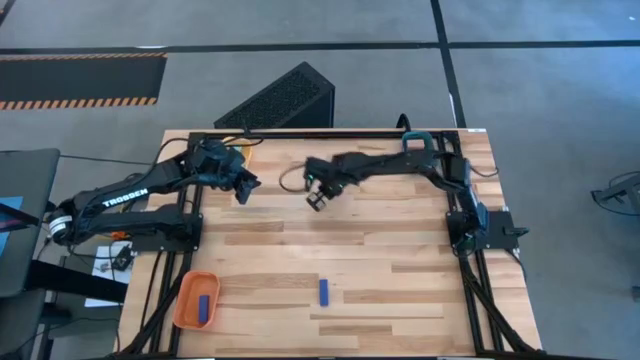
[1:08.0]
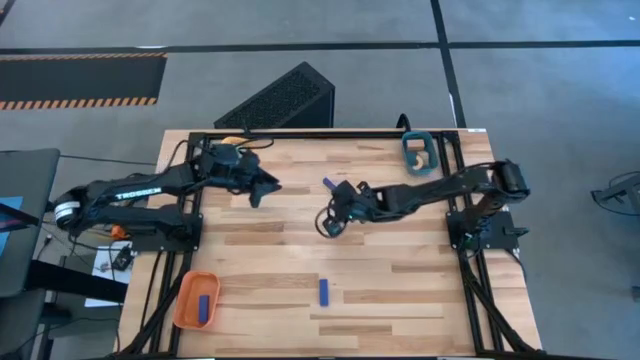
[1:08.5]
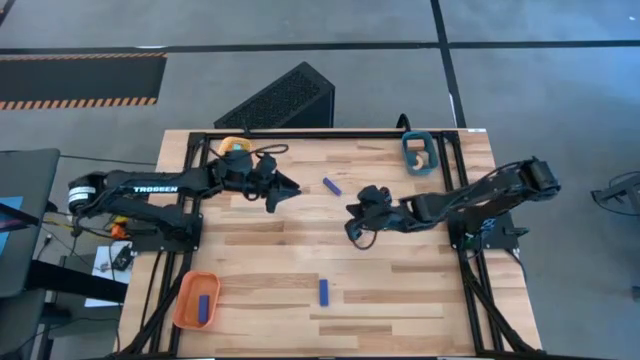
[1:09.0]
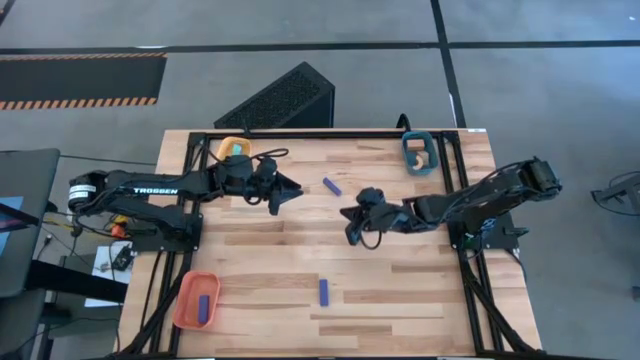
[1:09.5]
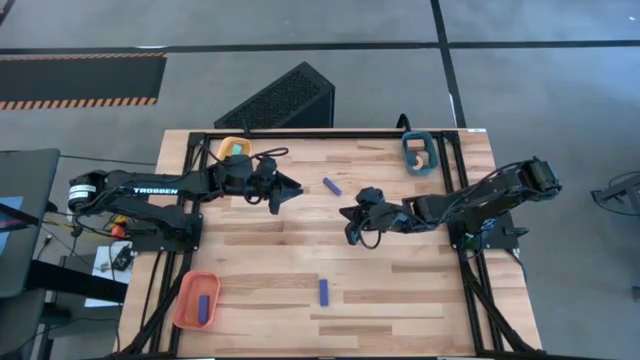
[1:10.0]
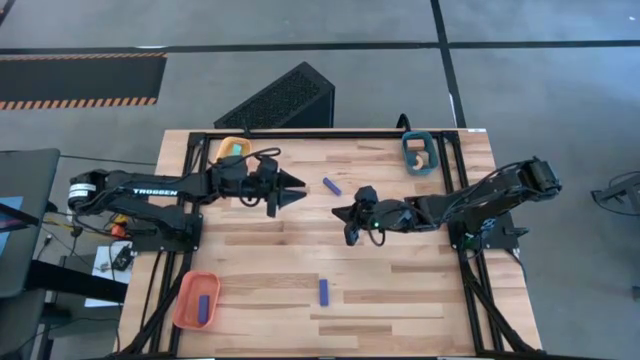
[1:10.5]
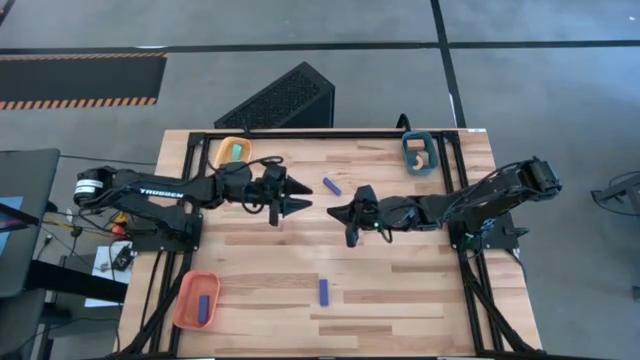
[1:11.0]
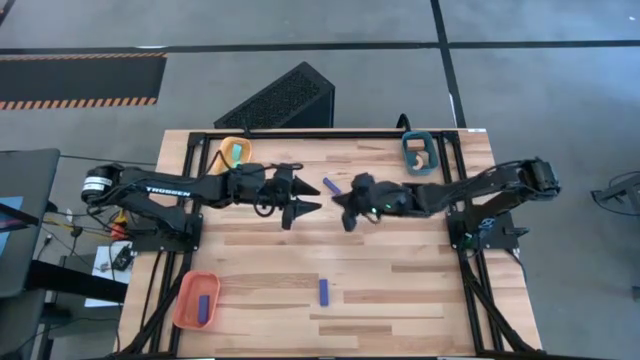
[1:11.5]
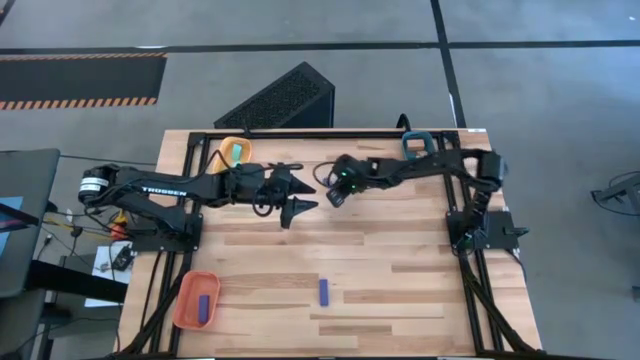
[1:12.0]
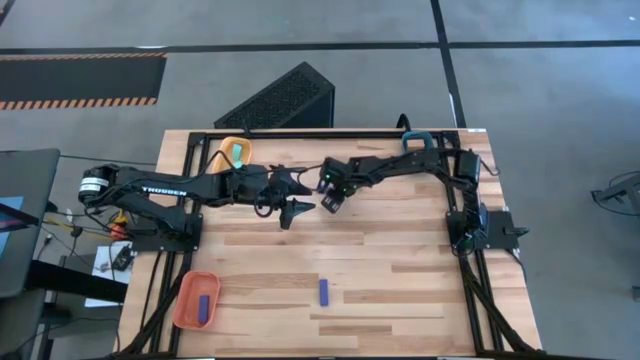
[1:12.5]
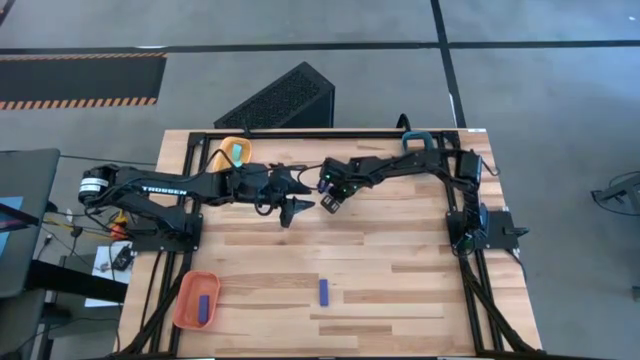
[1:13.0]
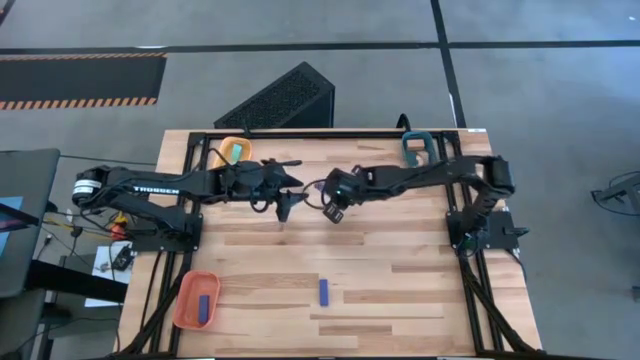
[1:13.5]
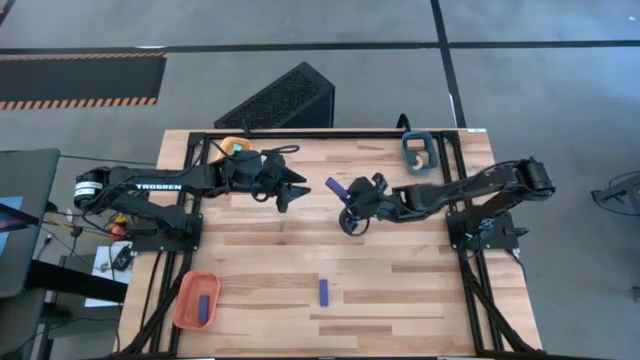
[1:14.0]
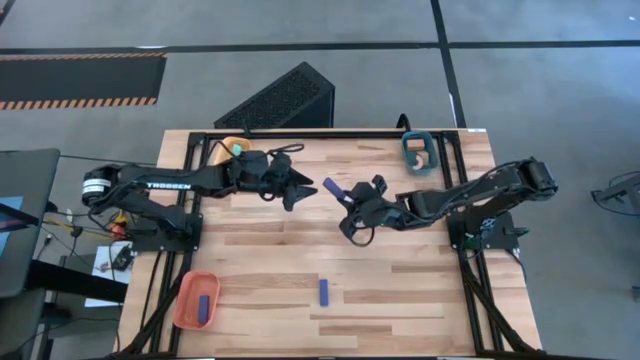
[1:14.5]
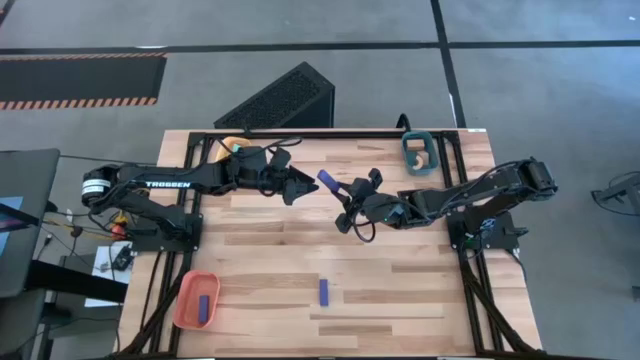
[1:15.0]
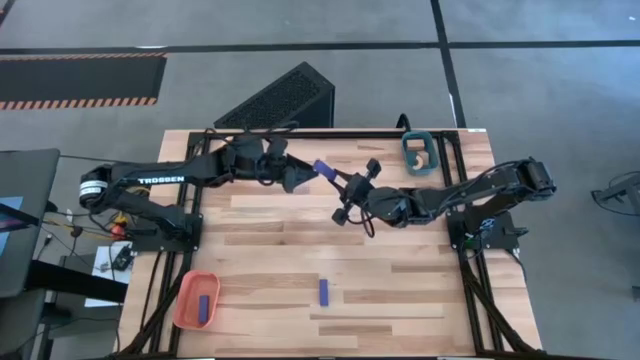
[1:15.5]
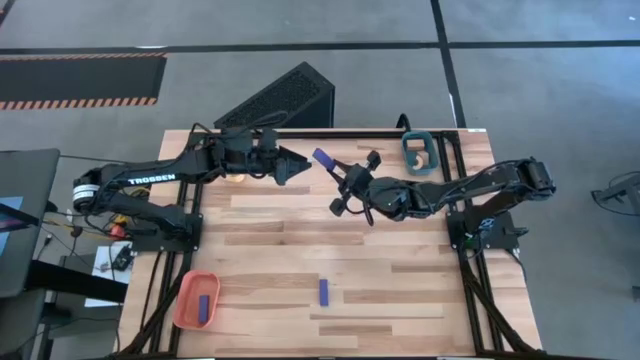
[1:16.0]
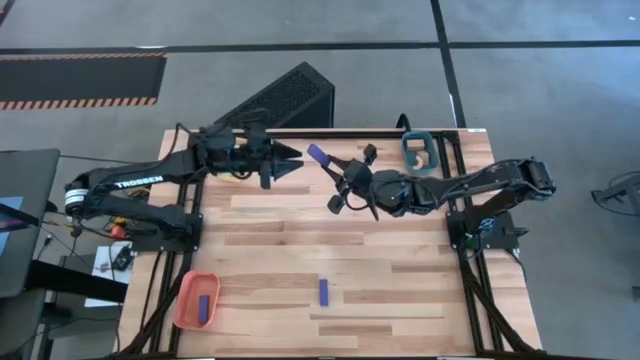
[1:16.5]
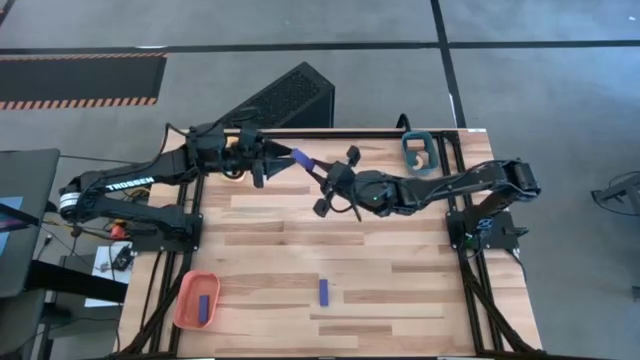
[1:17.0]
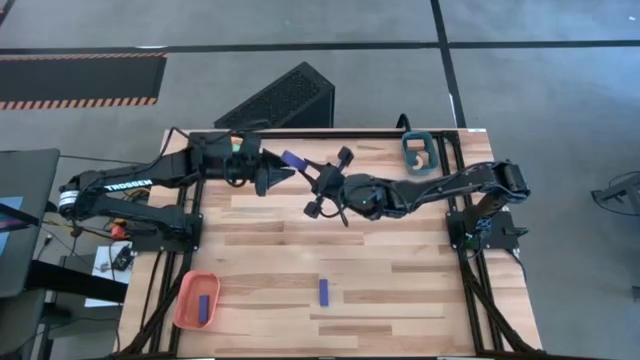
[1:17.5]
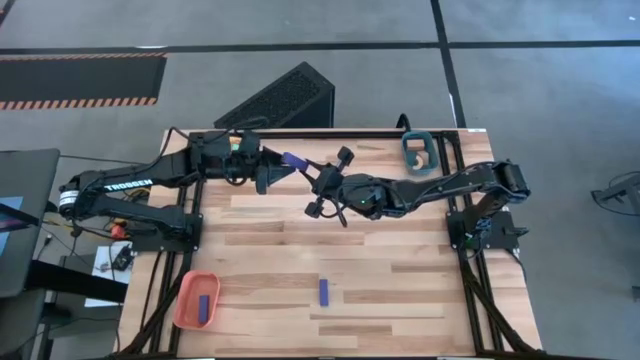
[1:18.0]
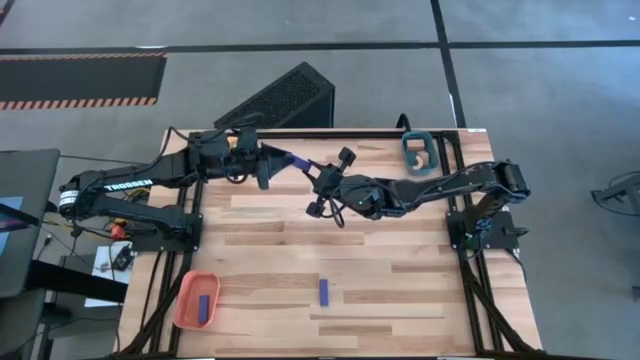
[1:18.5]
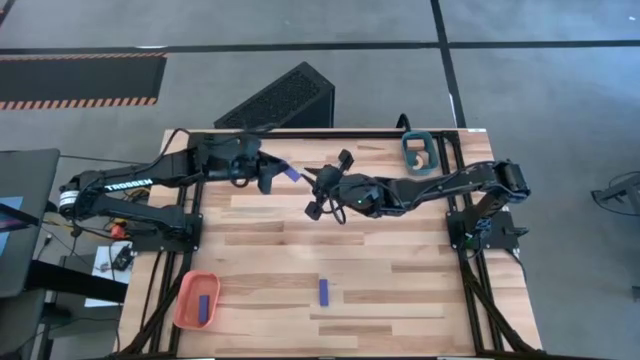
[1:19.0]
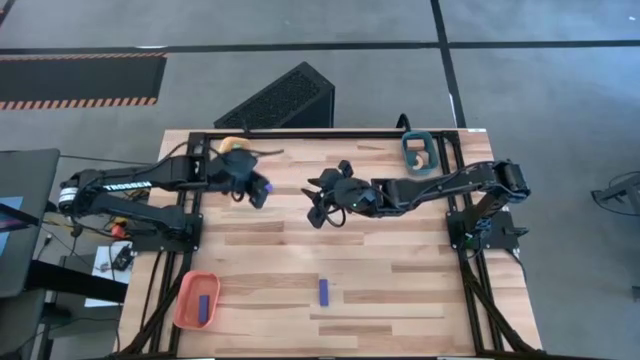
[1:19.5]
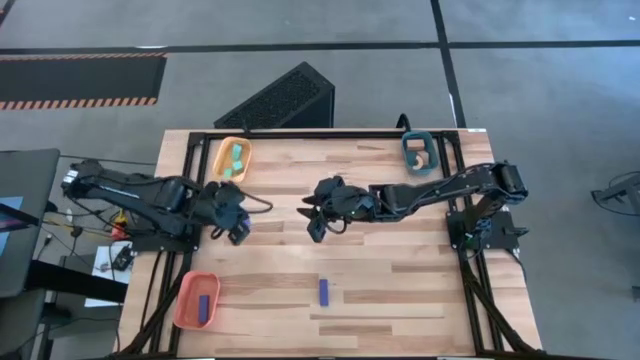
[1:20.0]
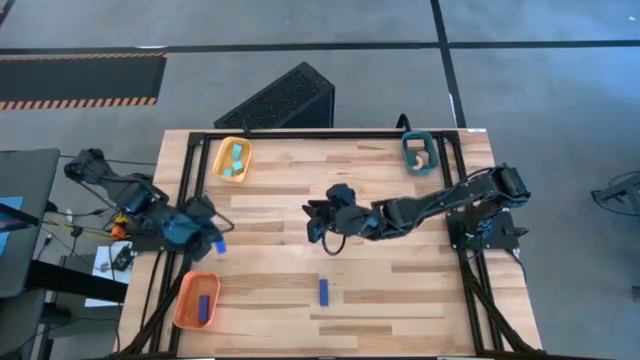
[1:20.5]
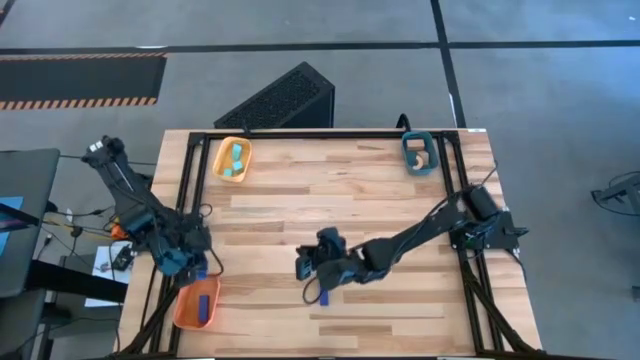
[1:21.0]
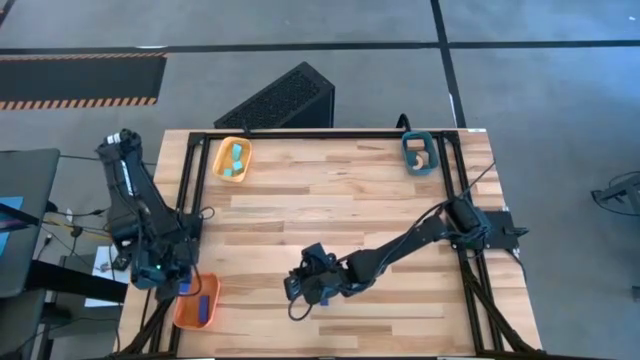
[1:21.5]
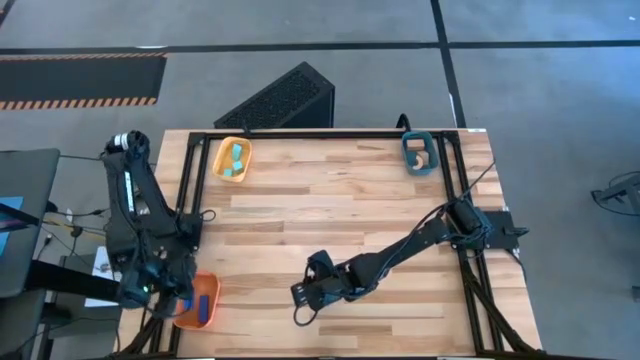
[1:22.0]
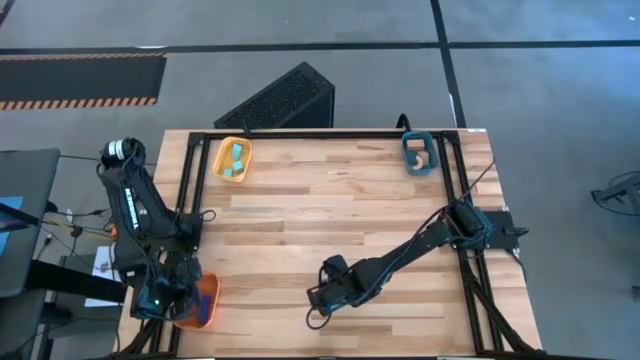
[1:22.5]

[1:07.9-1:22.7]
Task: Sort & place blocks by color
Put the top blue block into the orange bin

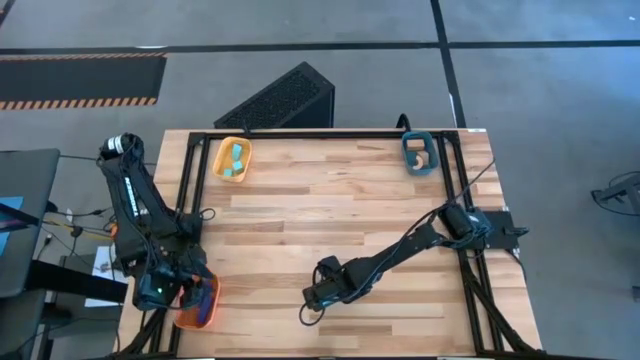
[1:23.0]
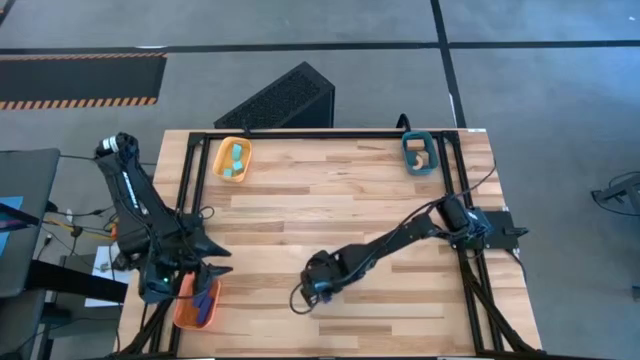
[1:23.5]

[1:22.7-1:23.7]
Put the blue block into the orange bin

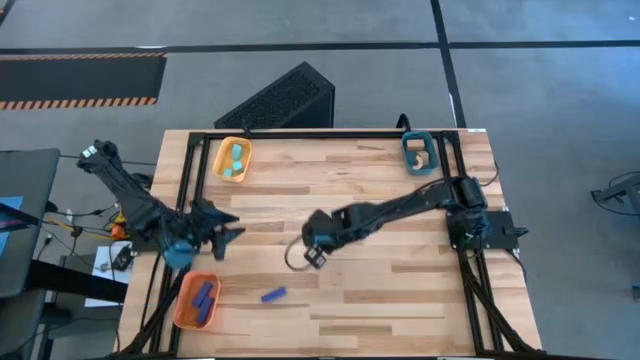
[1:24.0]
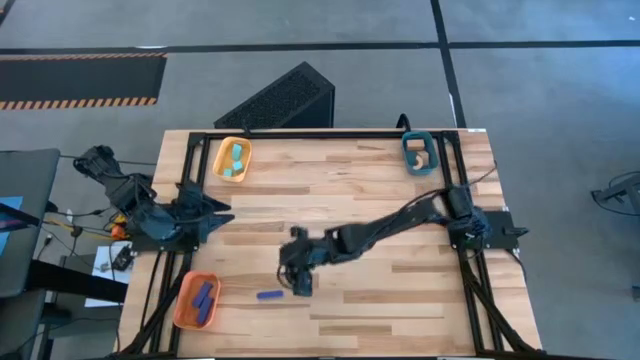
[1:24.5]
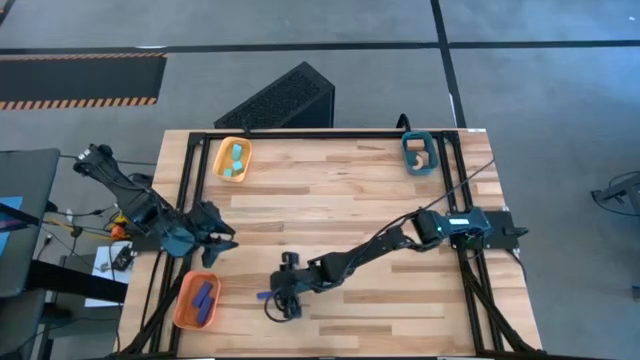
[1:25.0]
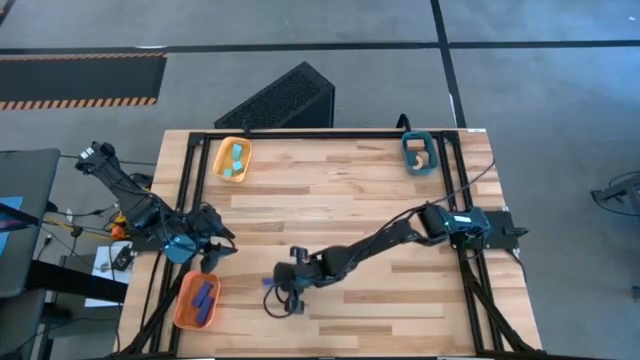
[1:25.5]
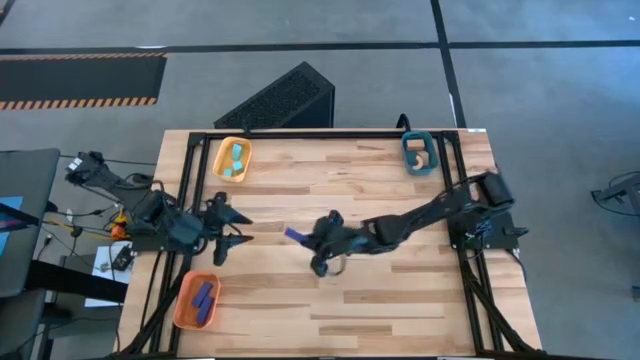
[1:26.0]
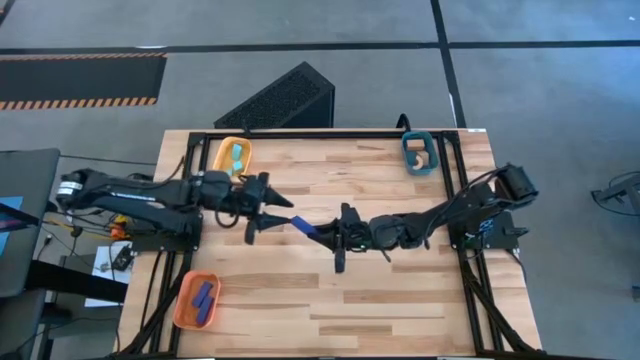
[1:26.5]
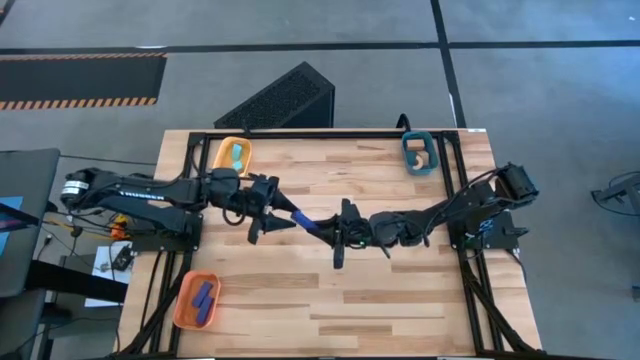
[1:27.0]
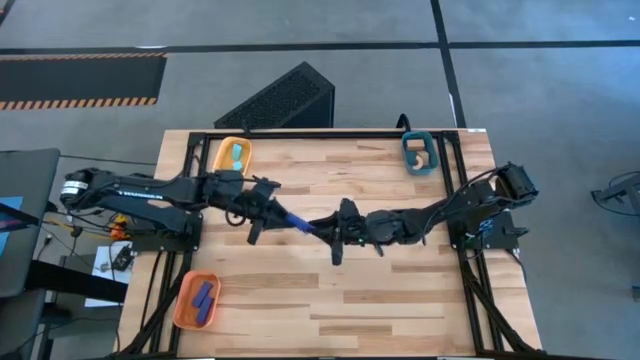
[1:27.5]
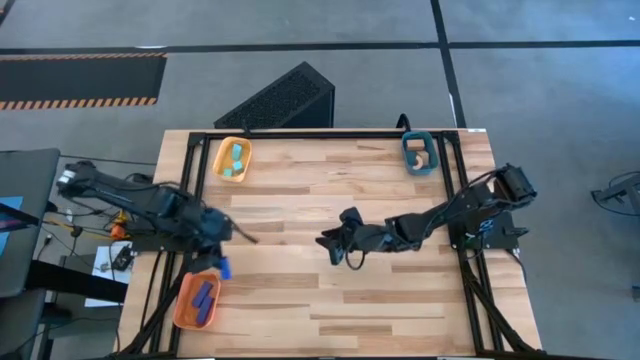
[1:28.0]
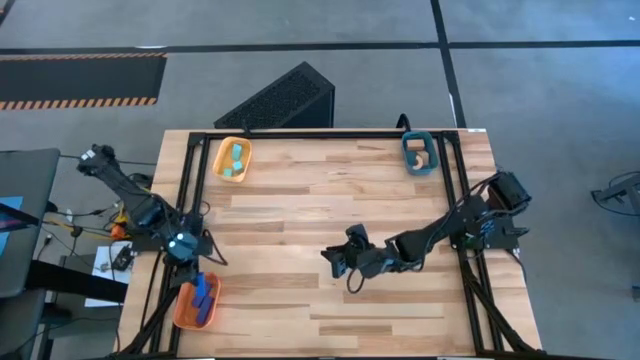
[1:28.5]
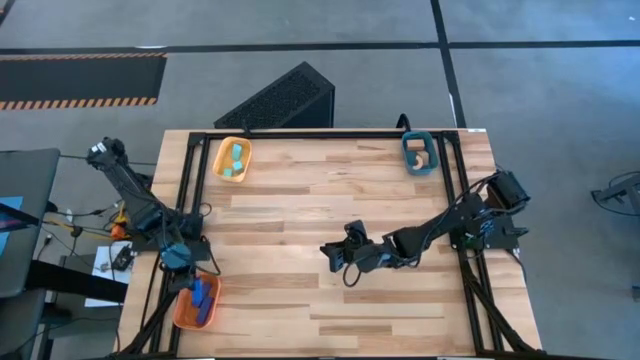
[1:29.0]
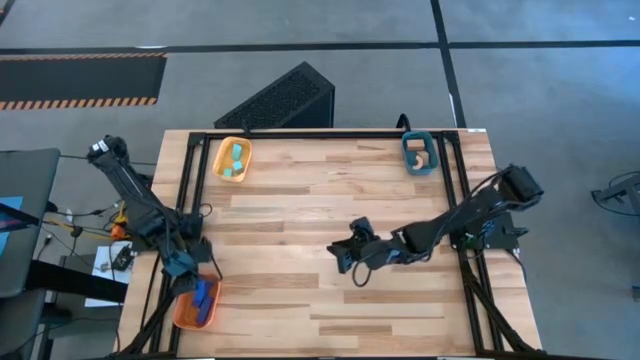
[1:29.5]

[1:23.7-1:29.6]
Put the blue block into the orange bin
